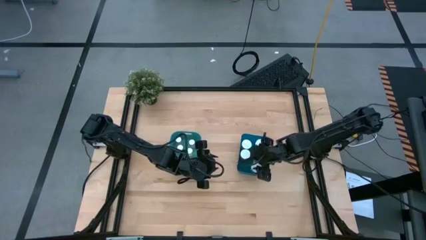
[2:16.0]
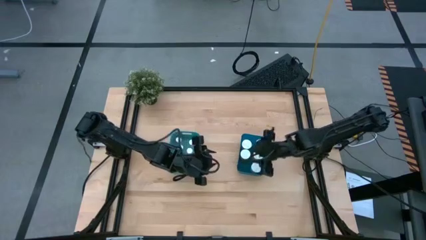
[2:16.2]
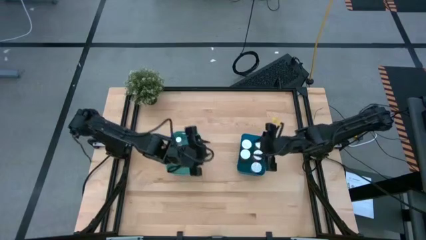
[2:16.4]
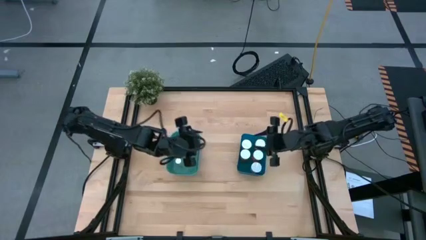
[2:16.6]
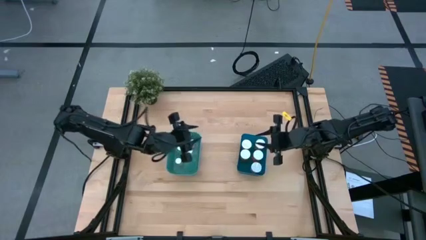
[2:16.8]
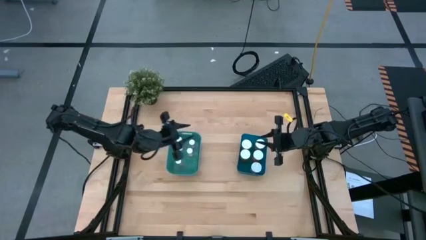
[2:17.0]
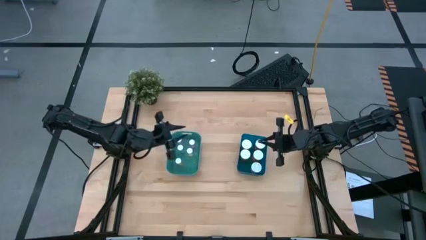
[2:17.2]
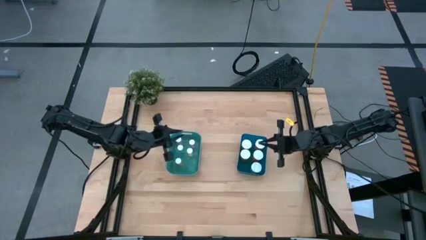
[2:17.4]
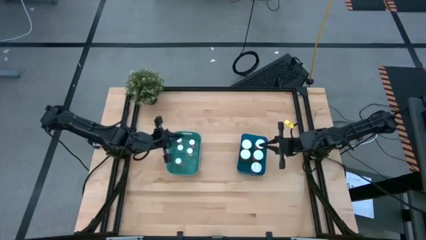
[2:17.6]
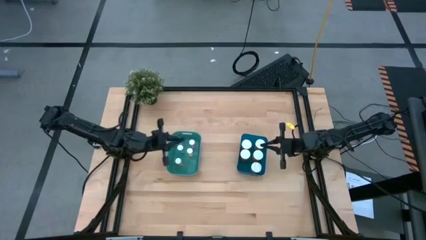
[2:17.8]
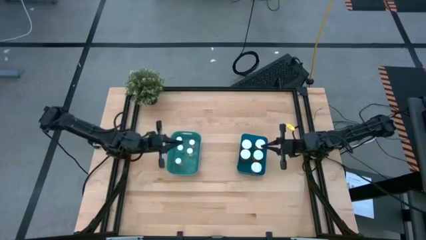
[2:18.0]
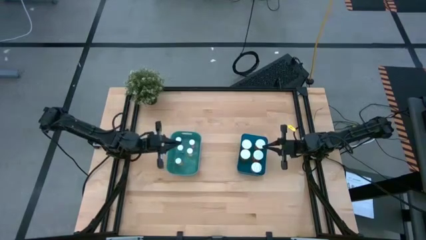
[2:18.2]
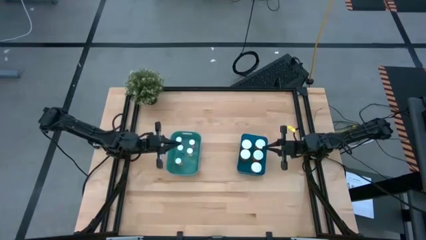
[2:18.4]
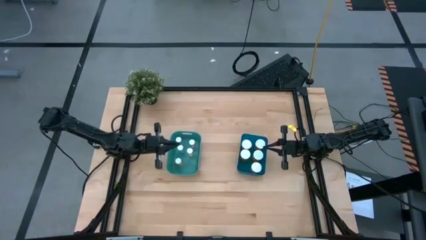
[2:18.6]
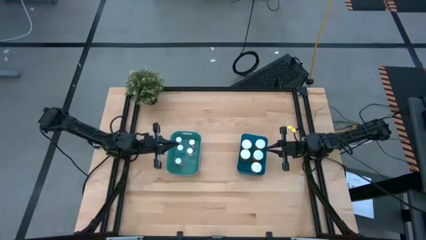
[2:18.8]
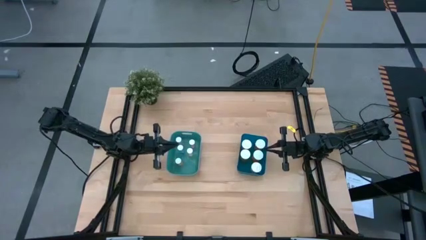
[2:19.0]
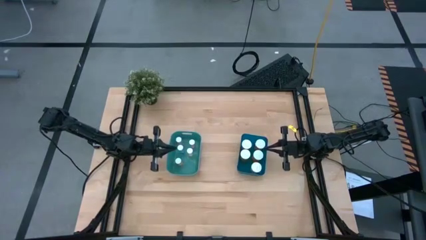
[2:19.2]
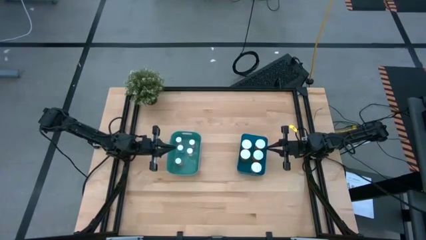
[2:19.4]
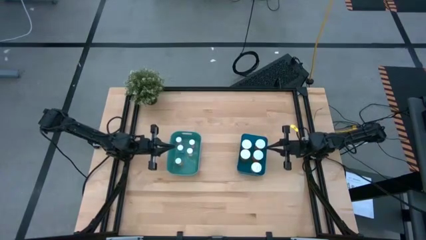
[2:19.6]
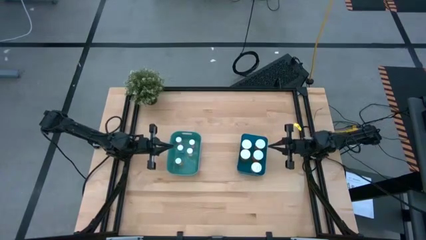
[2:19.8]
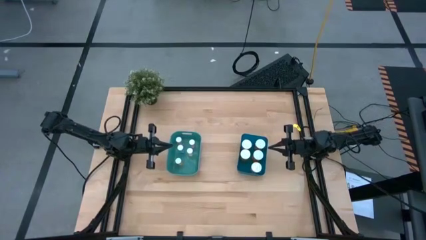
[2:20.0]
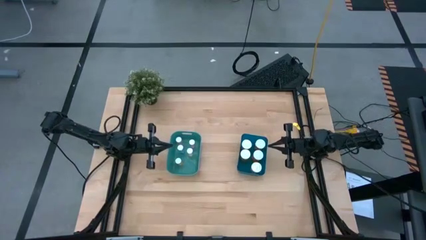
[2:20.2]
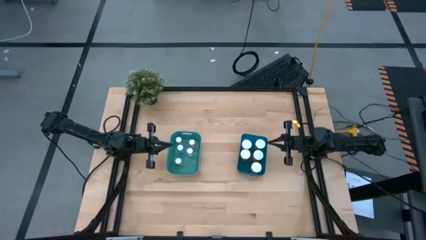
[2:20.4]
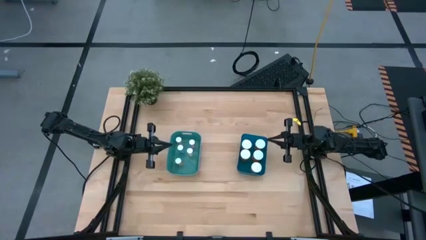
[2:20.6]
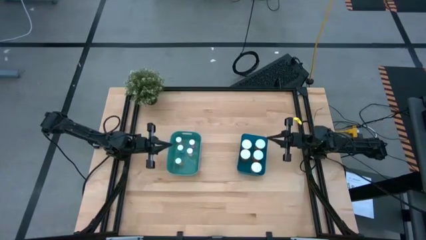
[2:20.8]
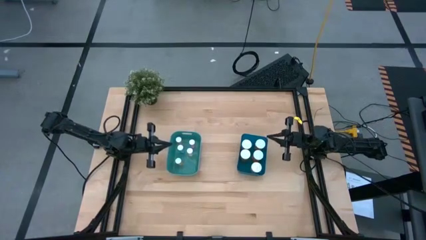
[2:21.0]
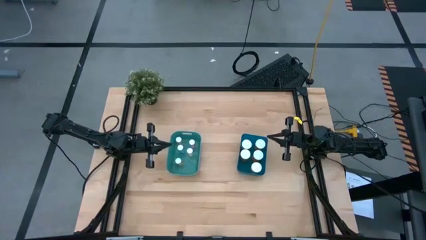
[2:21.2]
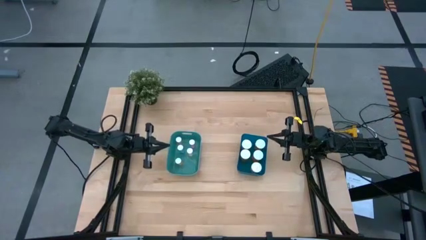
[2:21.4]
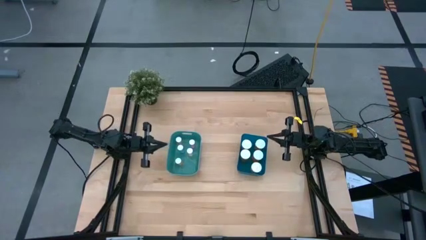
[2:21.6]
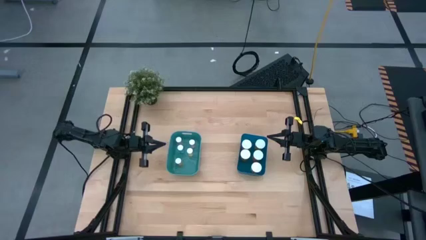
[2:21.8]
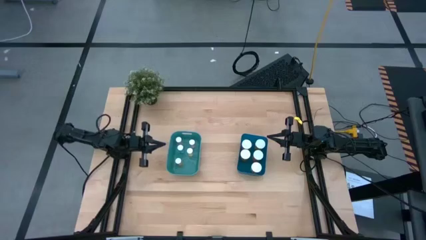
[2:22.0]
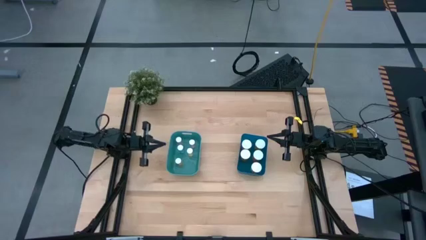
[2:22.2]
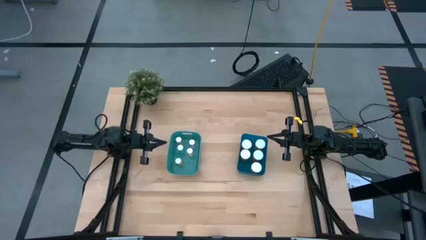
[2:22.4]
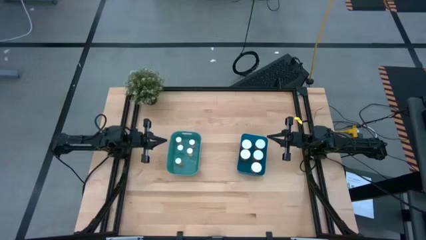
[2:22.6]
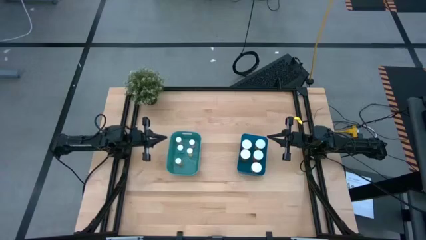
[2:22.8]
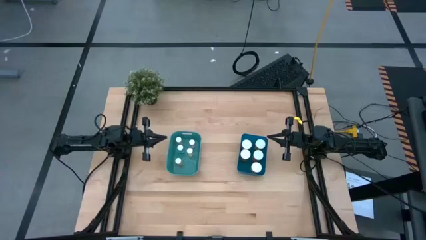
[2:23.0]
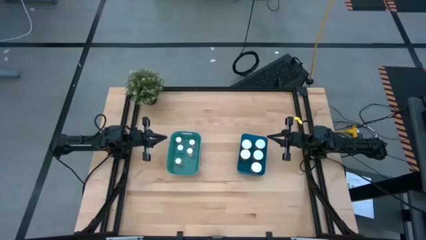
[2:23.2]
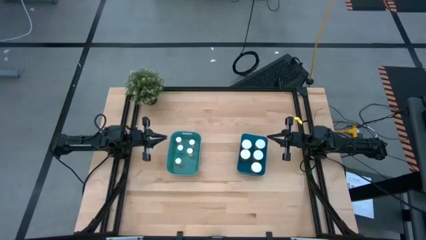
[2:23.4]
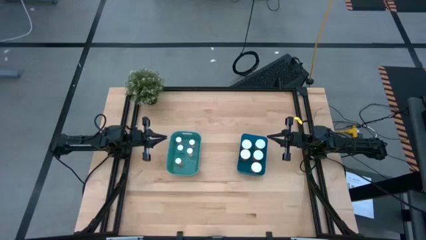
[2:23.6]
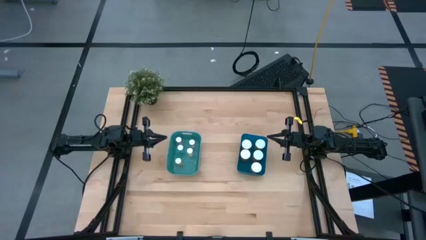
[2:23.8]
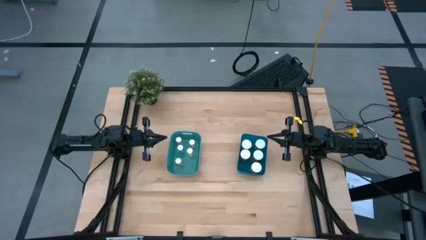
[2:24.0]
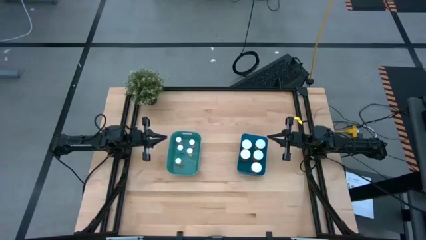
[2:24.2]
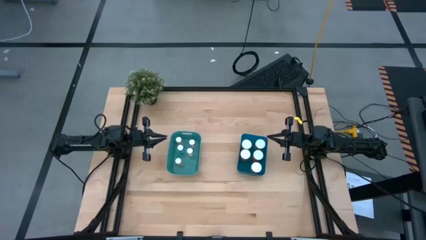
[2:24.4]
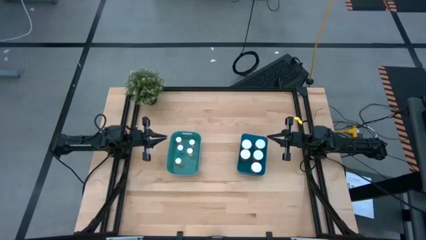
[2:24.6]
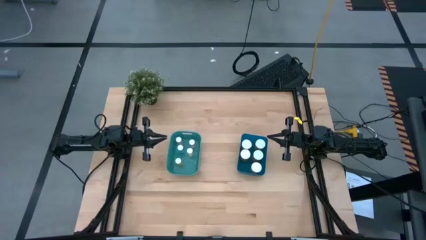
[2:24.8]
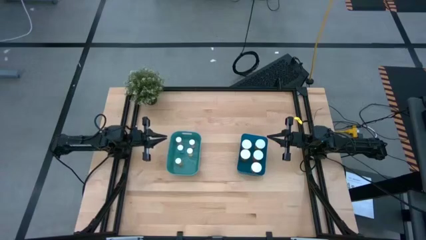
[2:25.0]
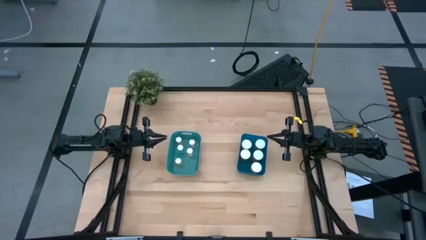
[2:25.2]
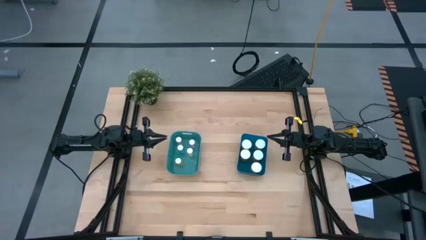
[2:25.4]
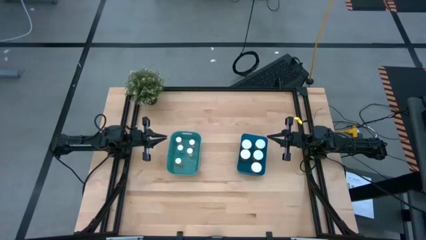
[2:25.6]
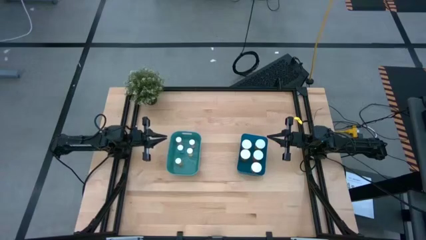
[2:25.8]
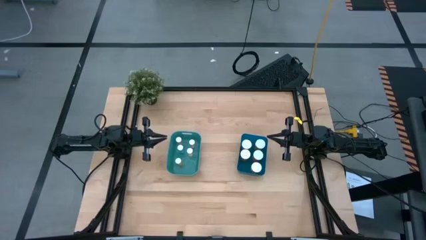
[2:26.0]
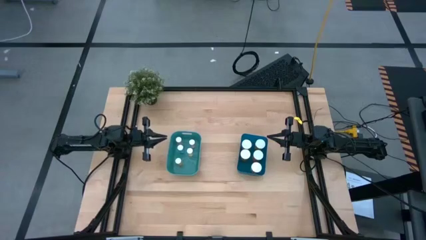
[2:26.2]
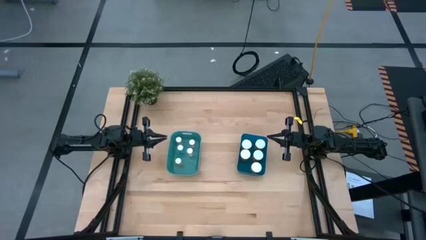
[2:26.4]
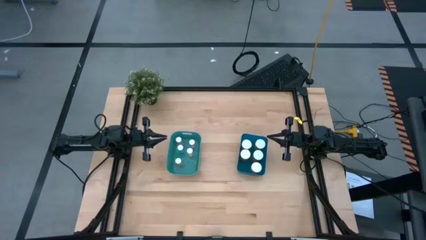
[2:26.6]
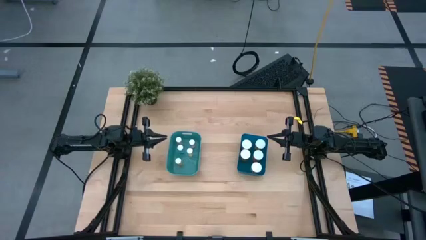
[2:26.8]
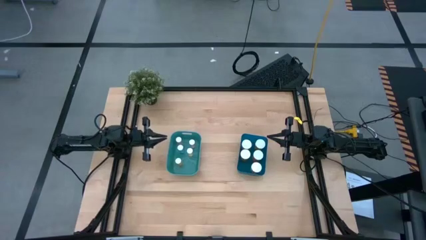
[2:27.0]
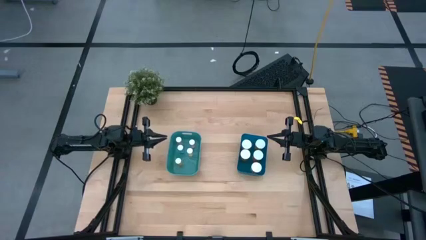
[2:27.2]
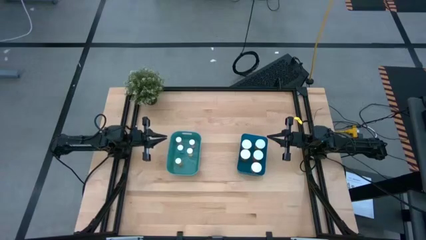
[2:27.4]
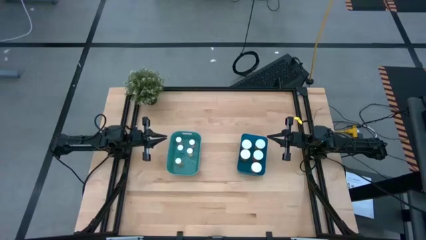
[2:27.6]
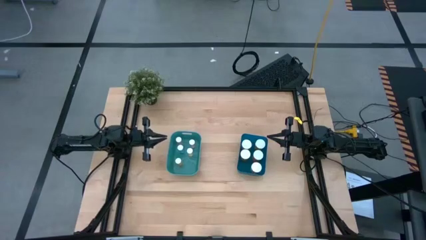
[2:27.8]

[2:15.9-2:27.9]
Task: Pick and place medicine bottles into bin by pill shape (circle, oval)
Return to Home Position

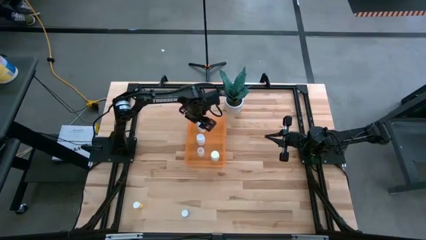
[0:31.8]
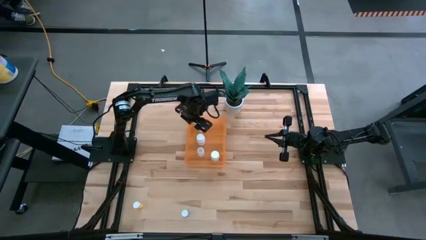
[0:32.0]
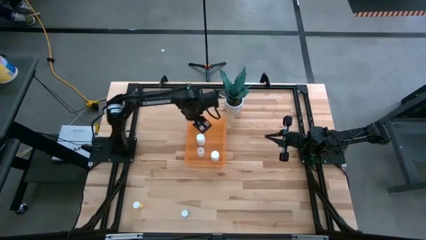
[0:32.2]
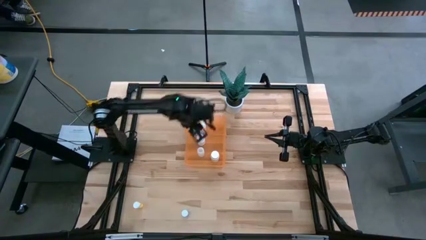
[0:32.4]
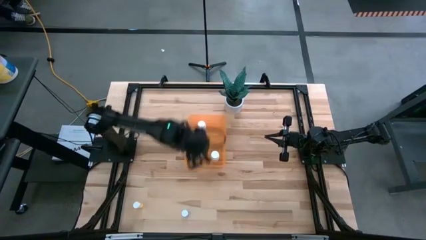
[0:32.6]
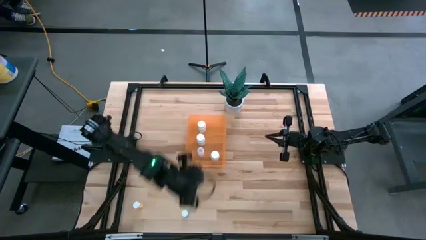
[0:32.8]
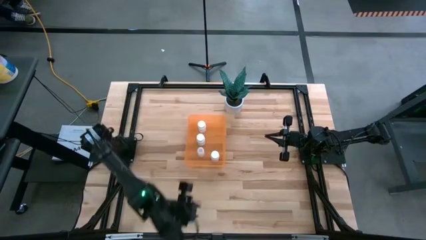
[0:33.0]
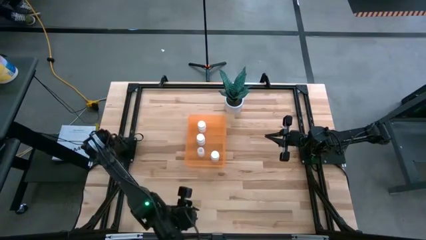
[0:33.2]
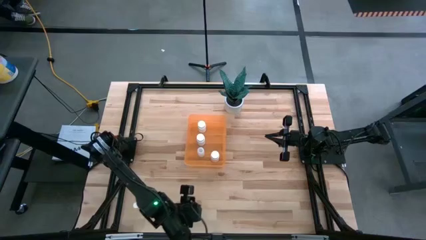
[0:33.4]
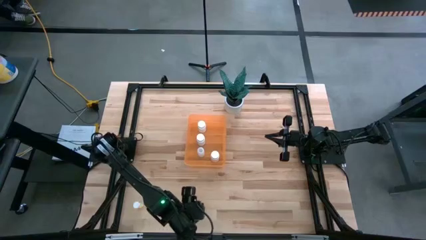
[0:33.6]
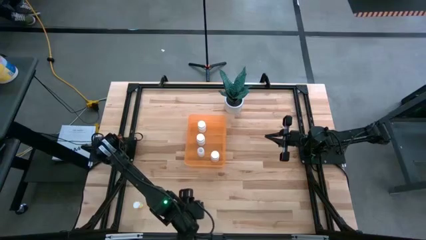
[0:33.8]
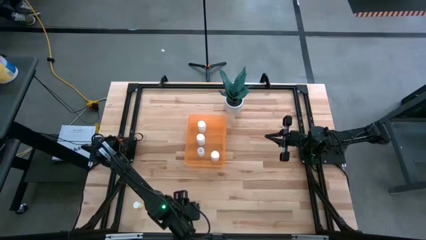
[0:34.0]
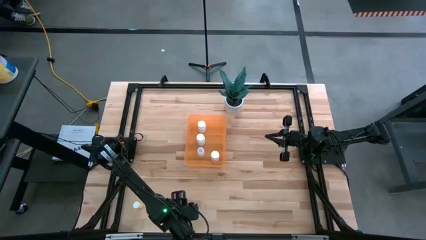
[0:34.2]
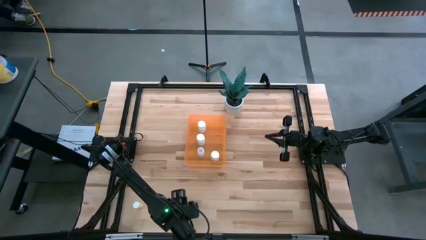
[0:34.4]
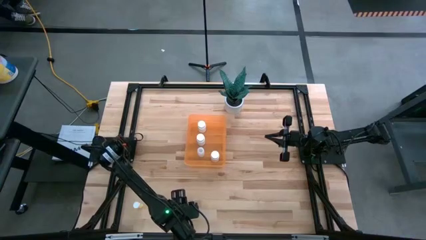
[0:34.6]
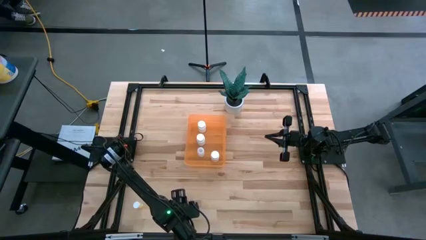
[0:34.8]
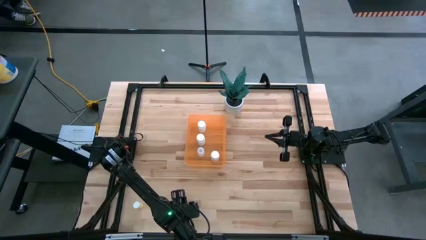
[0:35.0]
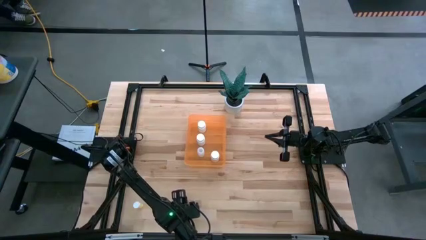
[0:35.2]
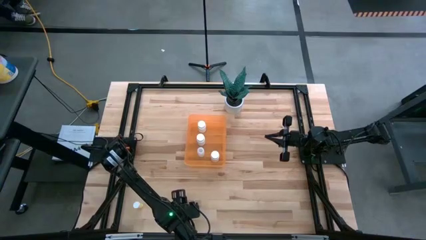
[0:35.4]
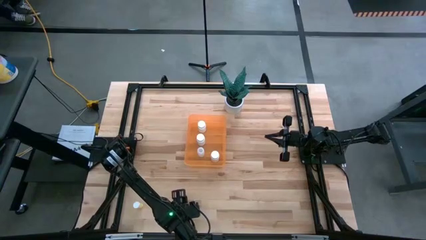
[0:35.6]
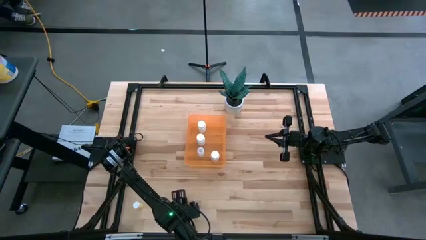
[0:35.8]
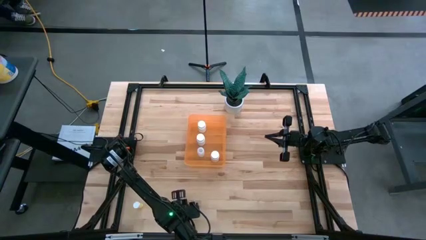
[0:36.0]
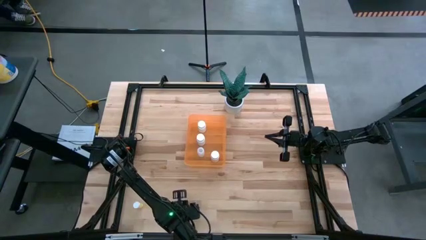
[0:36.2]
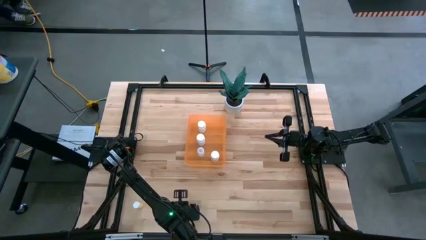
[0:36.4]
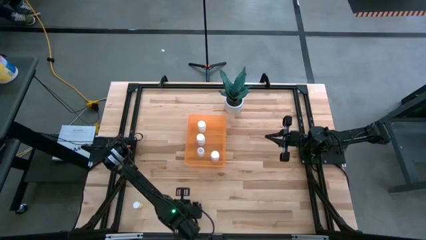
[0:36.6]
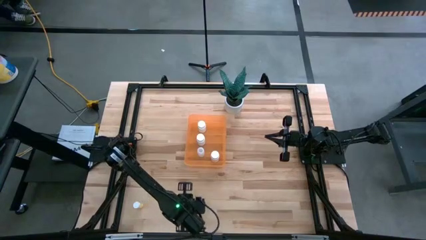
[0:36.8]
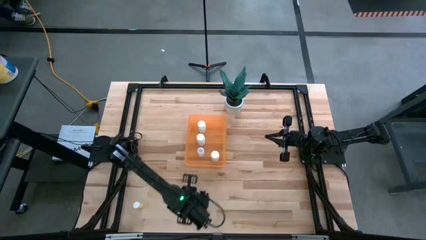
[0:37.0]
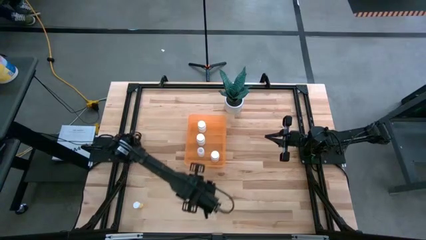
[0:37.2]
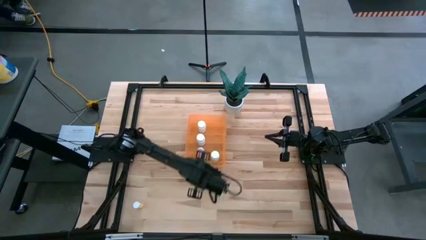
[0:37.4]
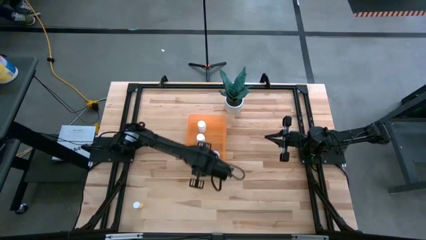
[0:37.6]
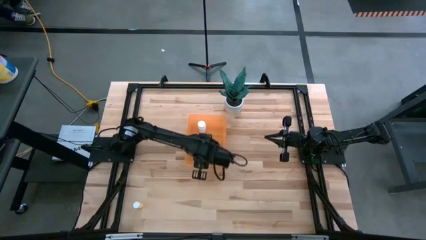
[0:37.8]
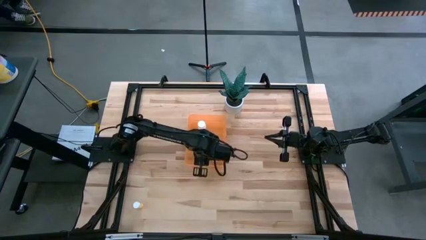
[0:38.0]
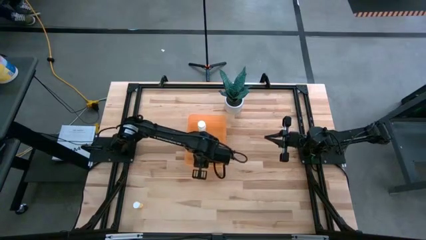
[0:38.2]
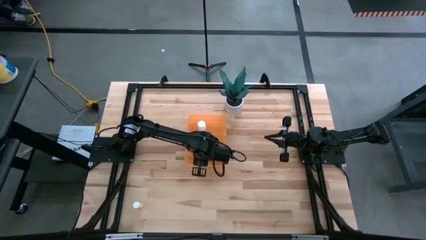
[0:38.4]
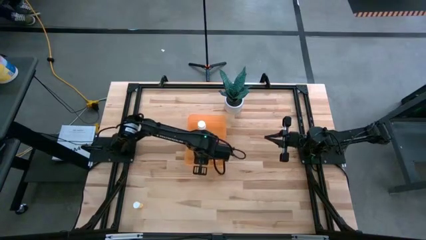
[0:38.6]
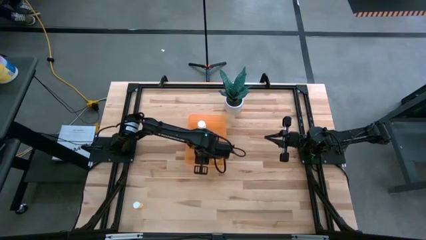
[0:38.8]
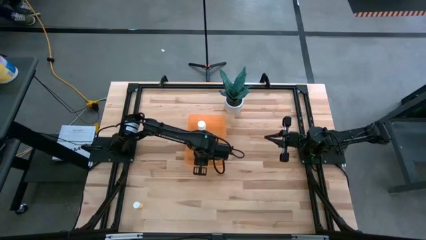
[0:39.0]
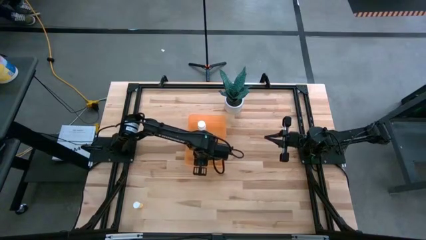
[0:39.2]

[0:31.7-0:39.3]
Task: Pick and place pill bottles into a basket
Put the right blue pill bottle into the orange container
